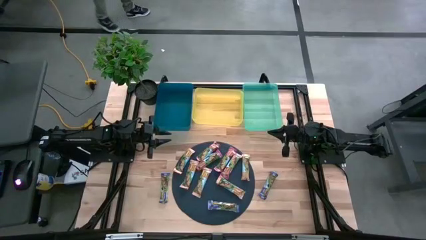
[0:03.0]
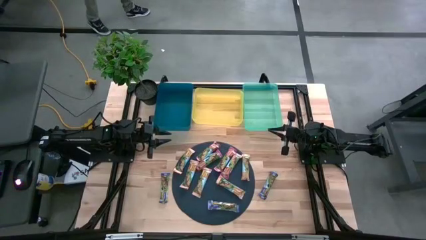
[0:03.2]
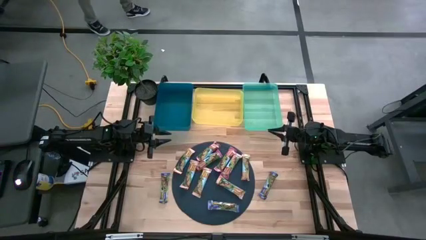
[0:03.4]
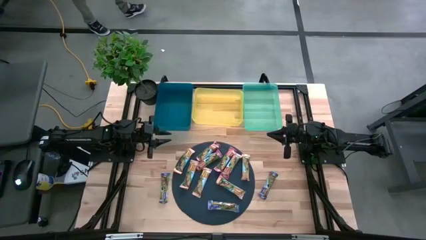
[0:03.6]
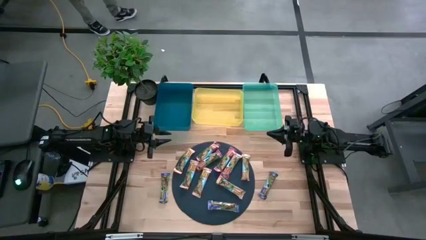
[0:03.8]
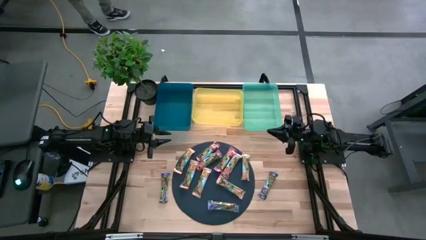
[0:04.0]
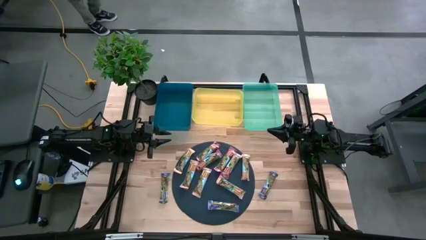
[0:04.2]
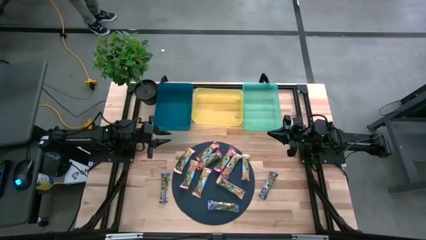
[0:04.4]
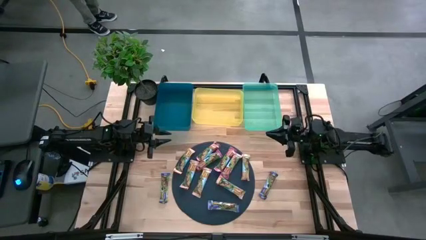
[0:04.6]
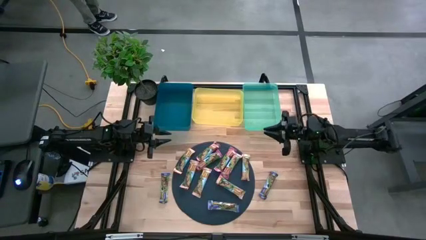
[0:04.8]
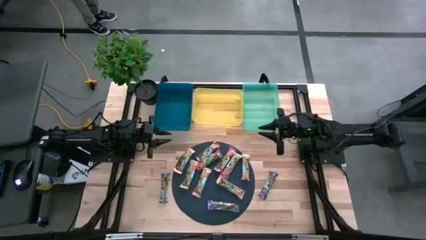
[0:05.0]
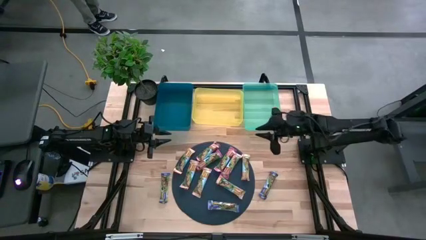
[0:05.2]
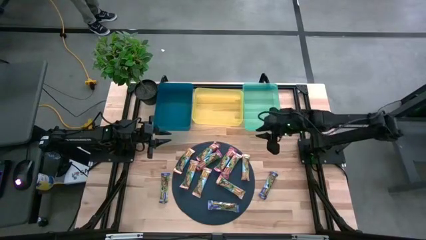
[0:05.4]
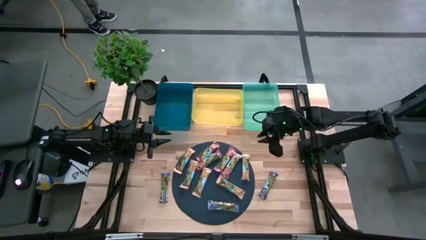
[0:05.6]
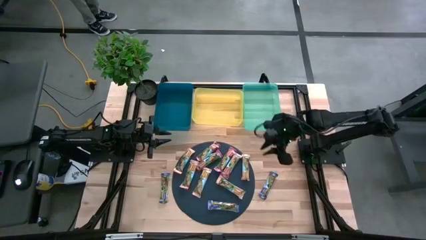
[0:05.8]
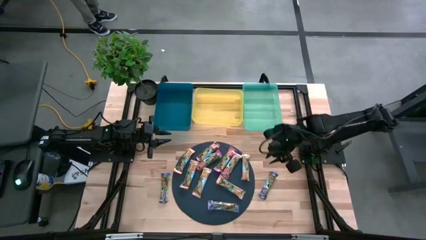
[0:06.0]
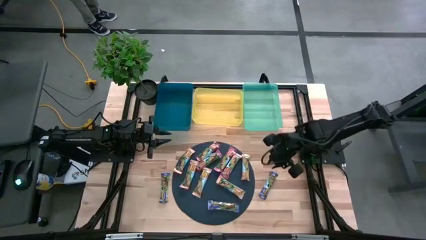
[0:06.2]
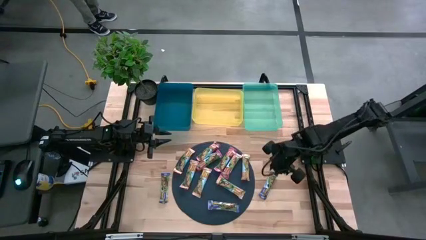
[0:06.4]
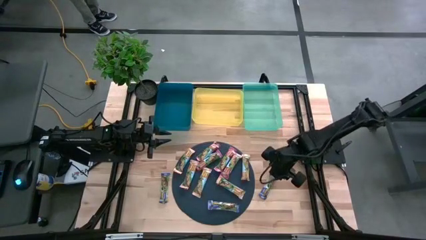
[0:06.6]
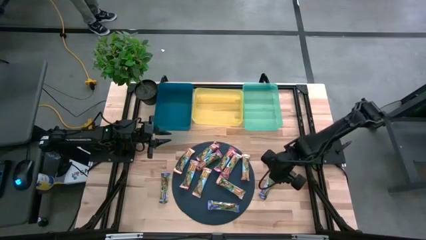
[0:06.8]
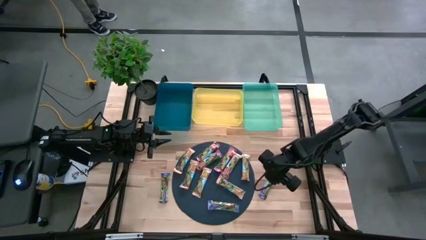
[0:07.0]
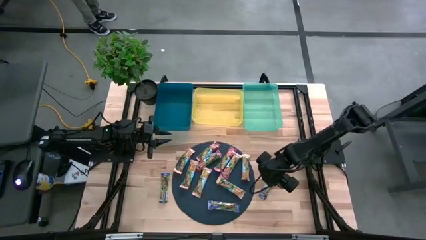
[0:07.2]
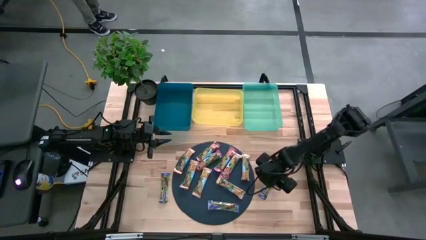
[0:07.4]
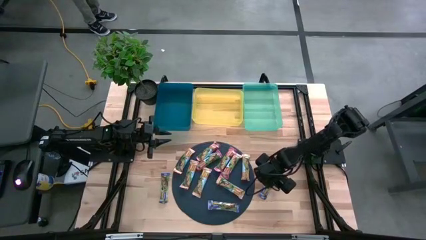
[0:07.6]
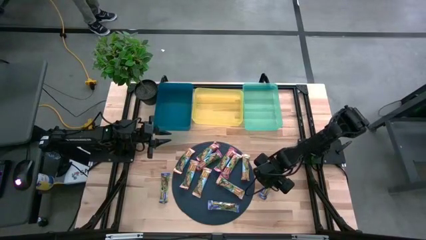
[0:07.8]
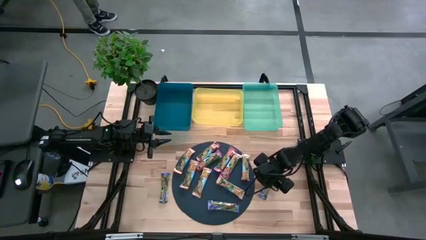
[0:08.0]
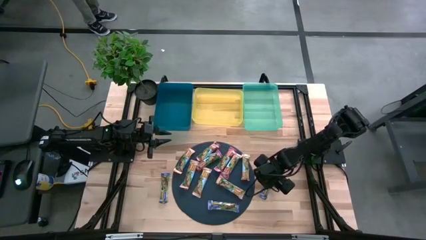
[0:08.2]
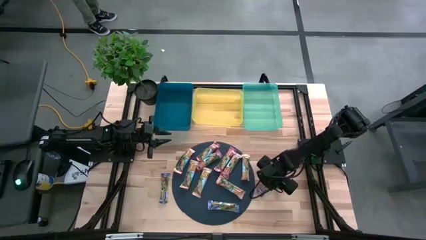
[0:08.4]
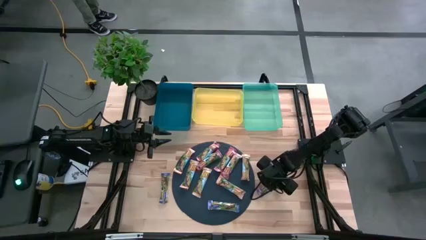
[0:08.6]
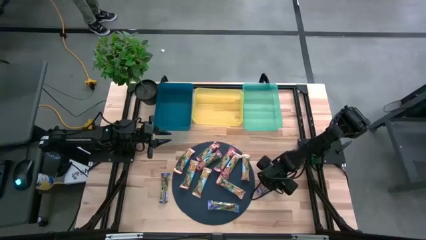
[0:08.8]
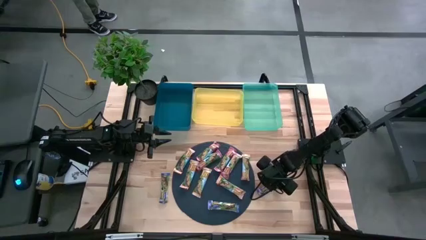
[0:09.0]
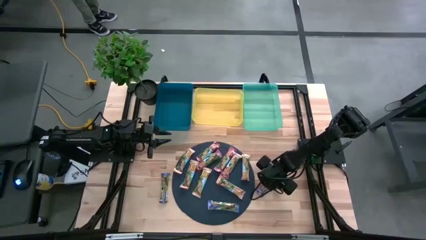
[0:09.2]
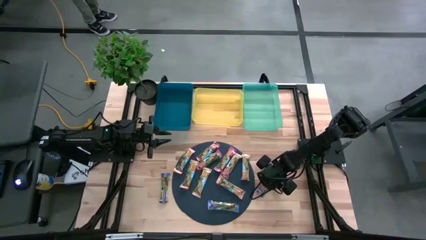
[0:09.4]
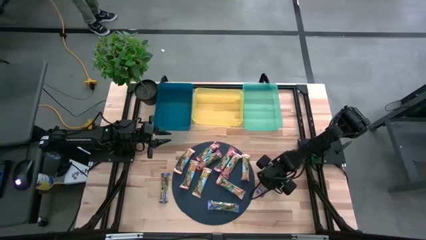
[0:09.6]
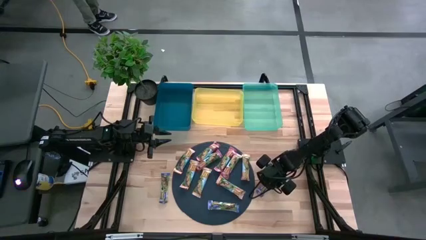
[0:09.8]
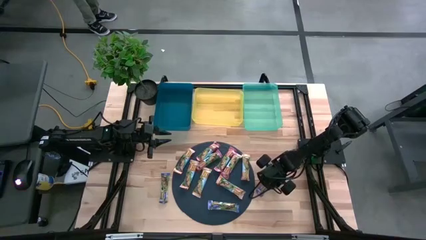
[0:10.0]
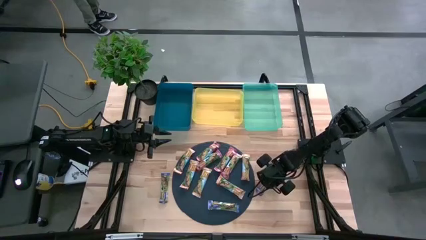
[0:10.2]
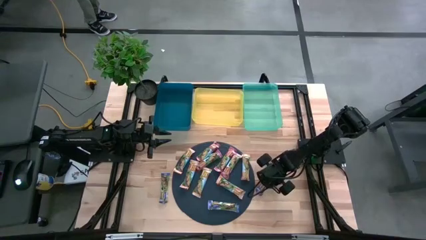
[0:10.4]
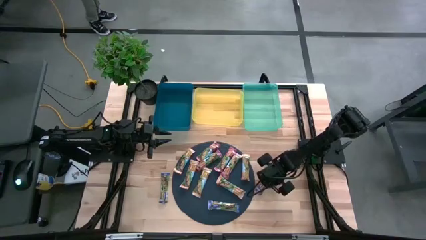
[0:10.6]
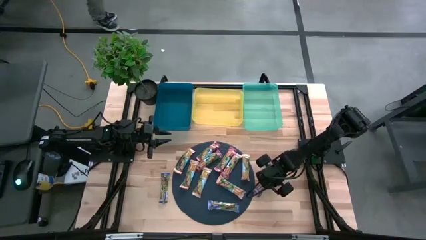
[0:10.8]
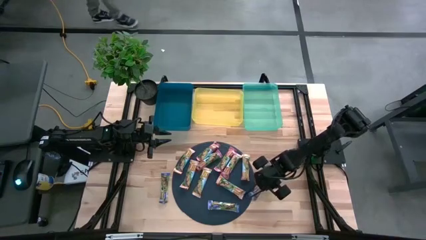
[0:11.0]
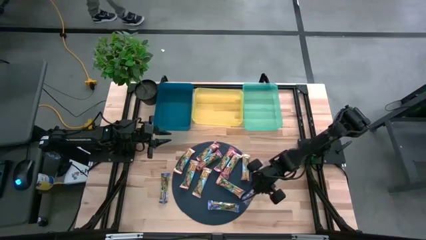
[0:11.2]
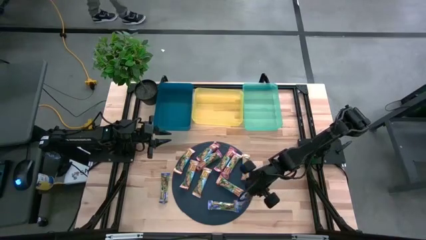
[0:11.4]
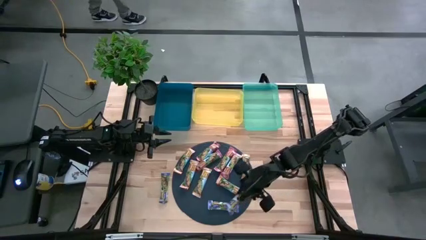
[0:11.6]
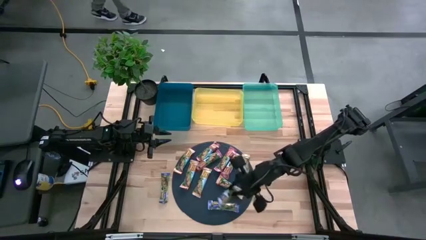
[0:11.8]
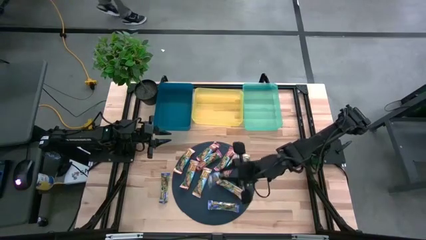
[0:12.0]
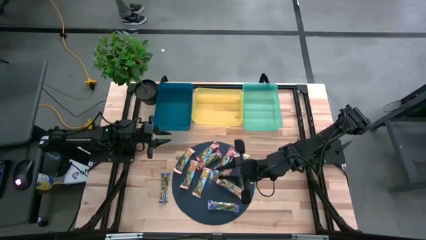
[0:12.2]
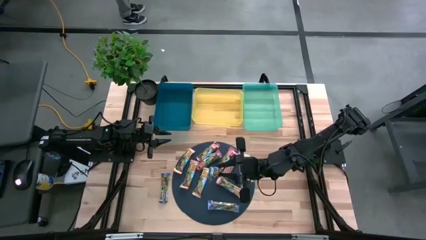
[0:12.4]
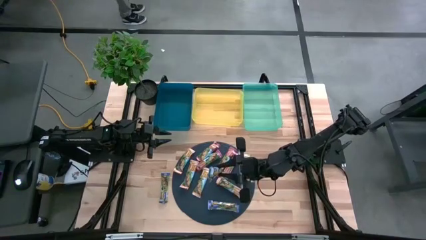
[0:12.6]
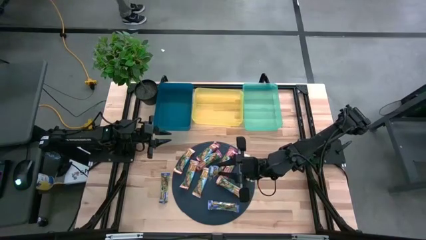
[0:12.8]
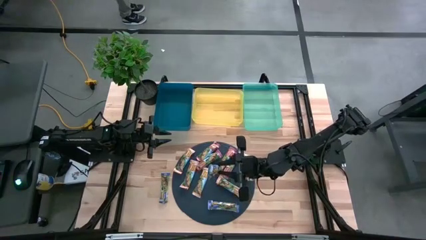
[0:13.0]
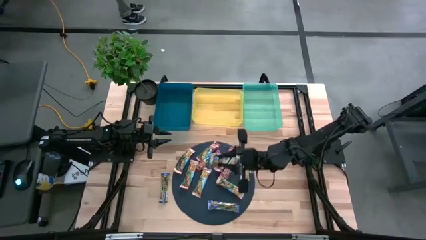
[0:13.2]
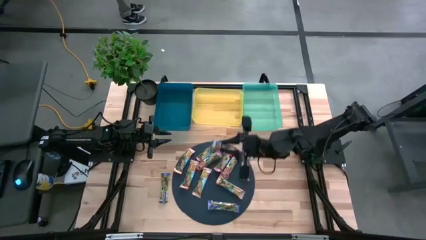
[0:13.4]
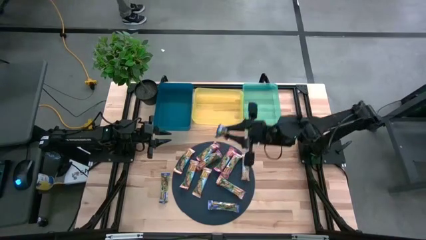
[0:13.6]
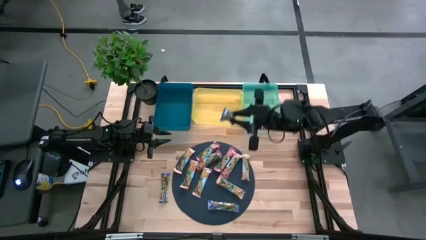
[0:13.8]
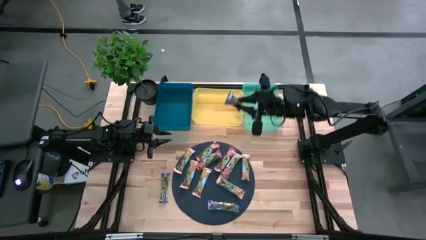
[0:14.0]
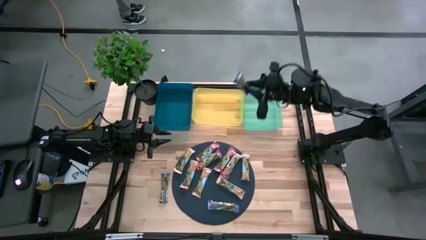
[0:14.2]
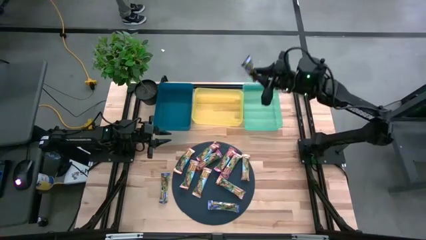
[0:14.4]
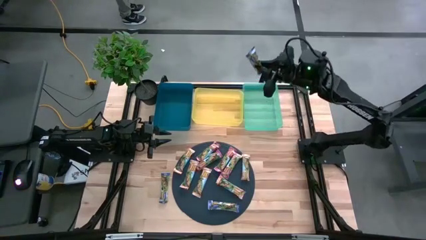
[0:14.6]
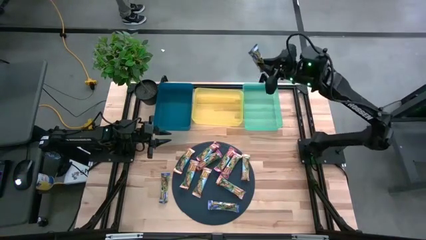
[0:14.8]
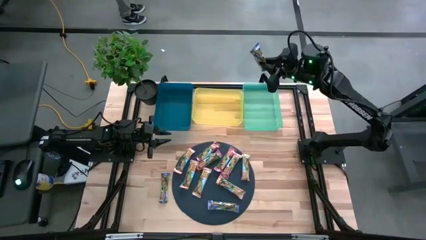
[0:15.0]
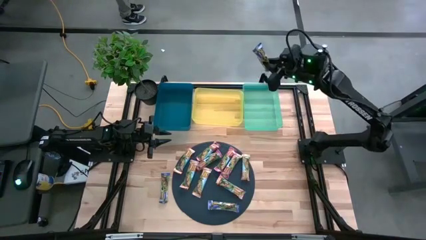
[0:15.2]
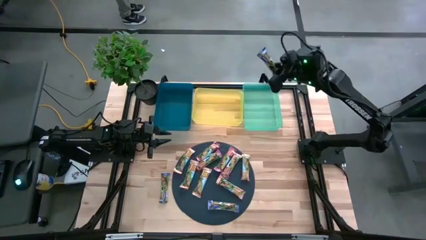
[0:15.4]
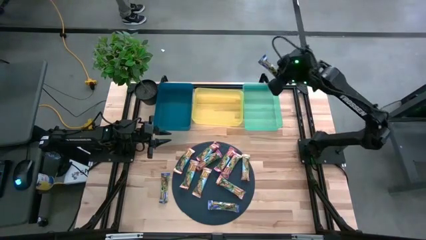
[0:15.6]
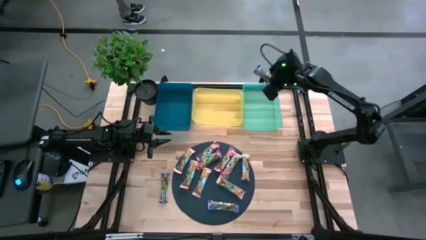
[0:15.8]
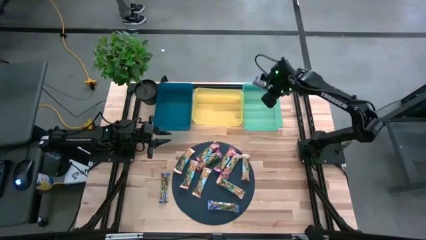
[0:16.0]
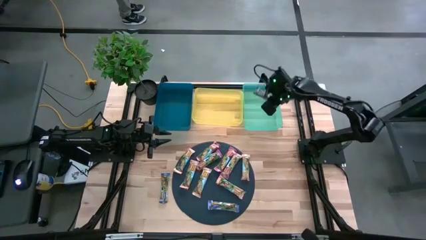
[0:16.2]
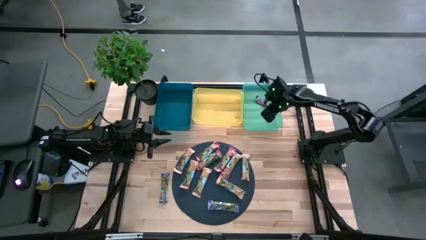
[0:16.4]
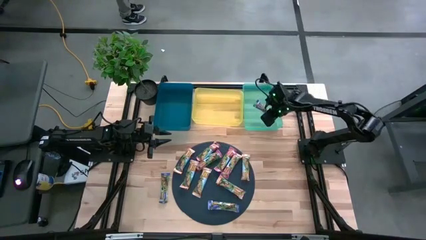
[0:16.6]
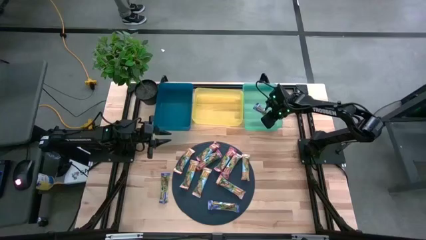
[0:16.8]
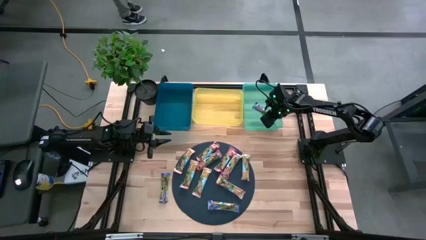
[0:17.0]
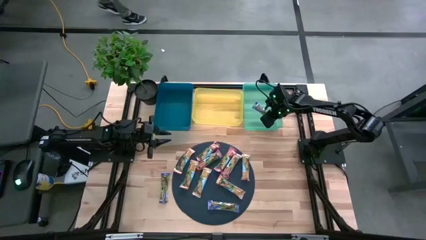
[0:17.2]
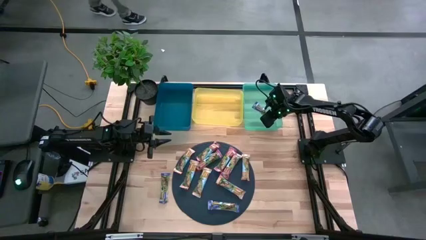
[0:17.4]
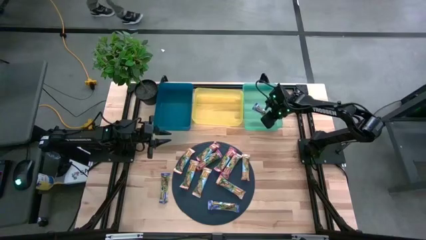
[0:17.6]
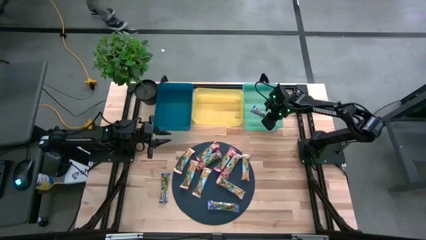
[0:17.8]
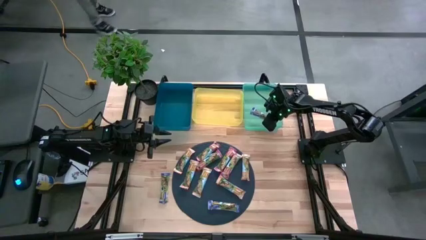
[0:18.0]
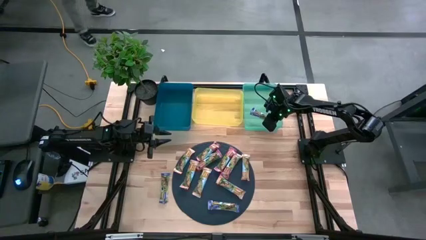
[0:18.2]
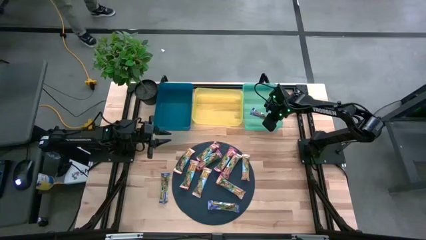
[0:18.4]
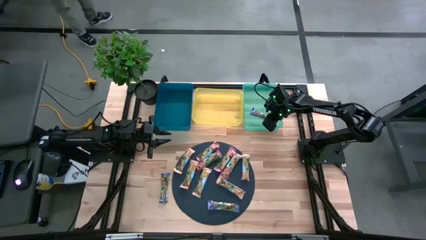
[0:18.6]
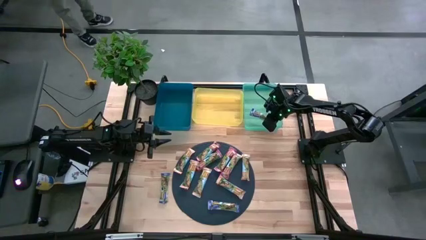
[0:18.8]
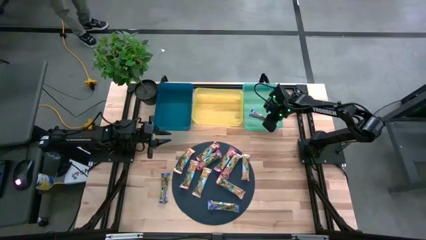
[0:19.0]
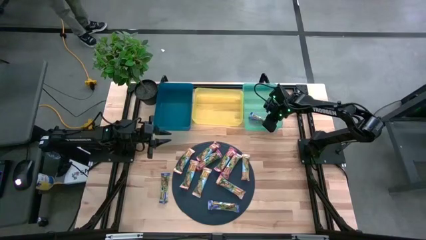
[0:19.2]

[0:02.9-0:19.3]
Task: Pick and place Granola Bars by type
Put the blue granola bar into the green bin
